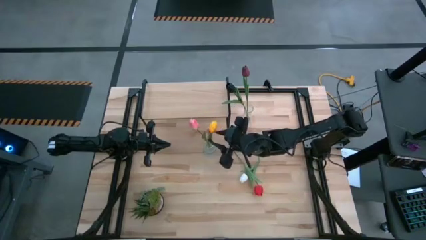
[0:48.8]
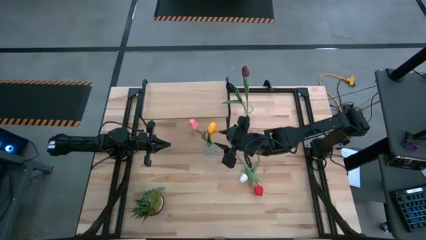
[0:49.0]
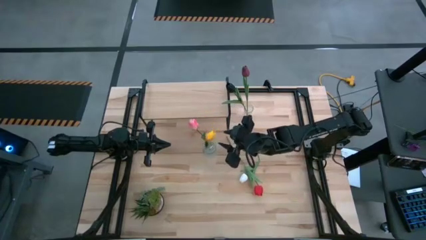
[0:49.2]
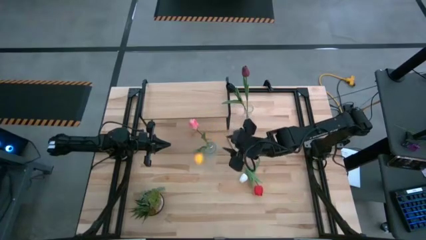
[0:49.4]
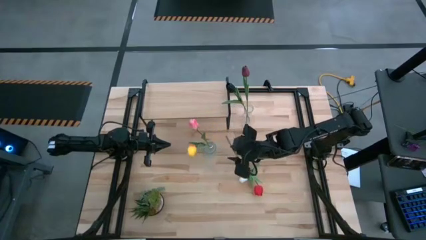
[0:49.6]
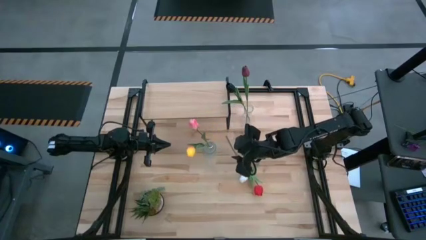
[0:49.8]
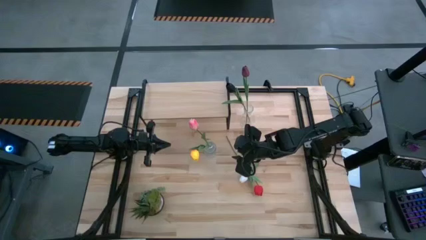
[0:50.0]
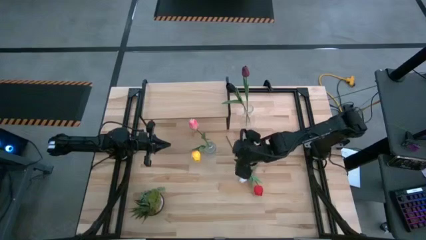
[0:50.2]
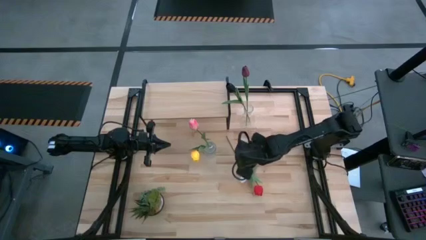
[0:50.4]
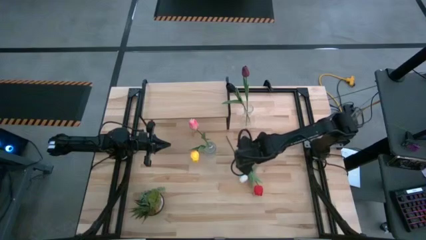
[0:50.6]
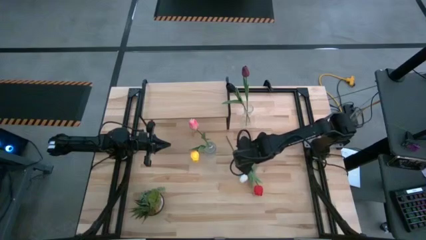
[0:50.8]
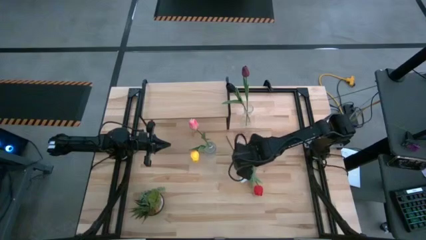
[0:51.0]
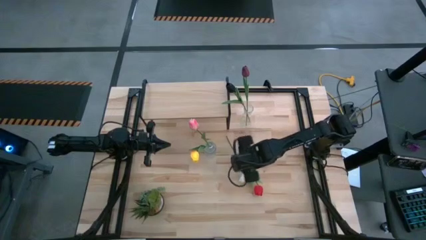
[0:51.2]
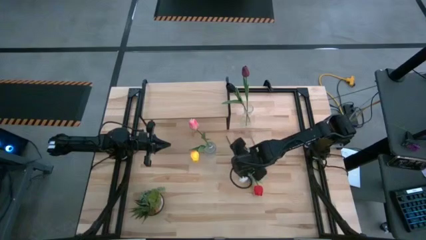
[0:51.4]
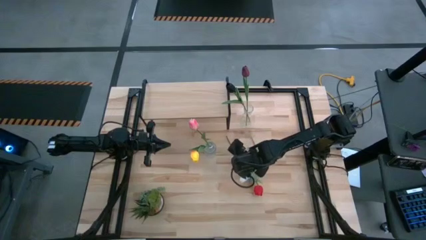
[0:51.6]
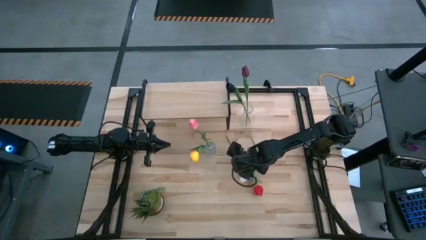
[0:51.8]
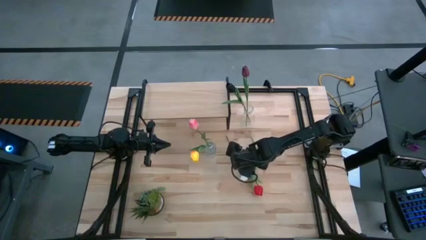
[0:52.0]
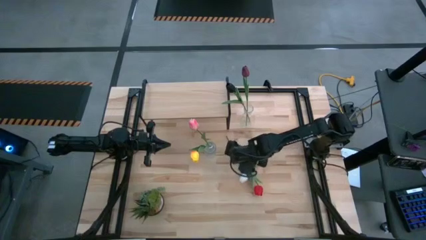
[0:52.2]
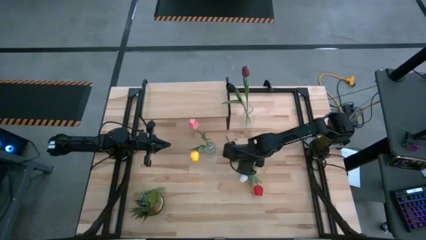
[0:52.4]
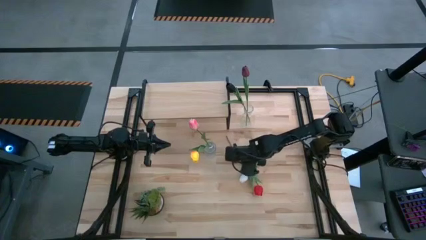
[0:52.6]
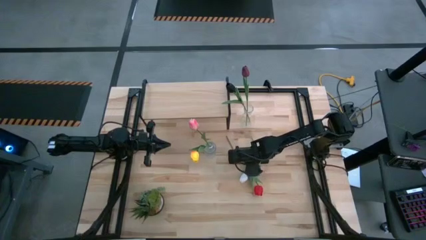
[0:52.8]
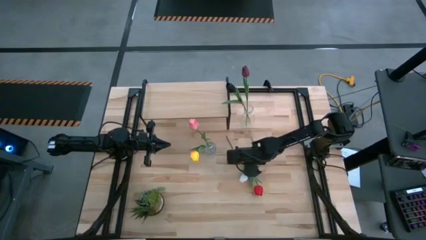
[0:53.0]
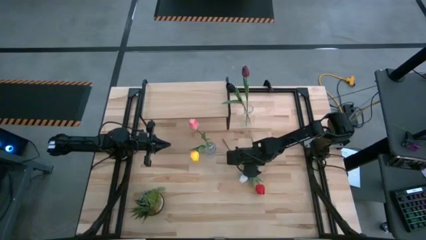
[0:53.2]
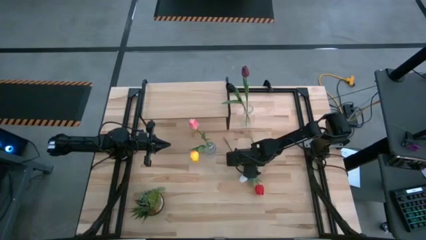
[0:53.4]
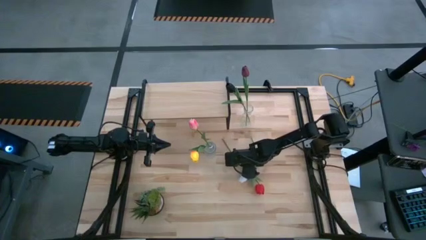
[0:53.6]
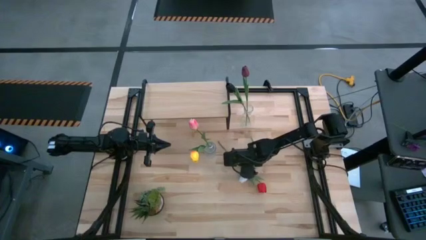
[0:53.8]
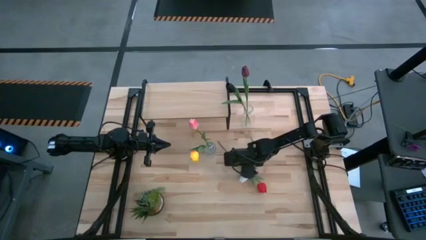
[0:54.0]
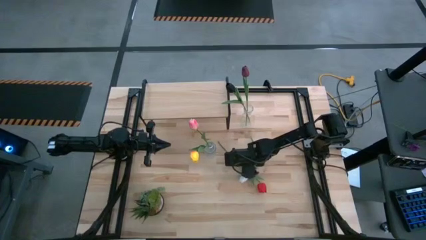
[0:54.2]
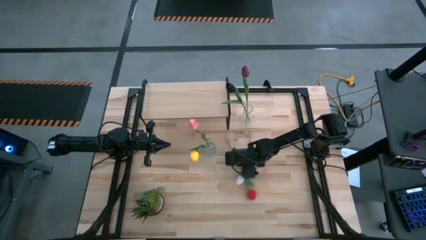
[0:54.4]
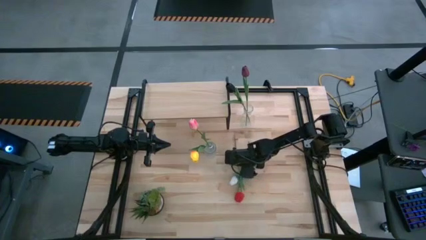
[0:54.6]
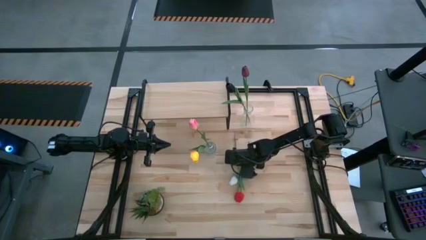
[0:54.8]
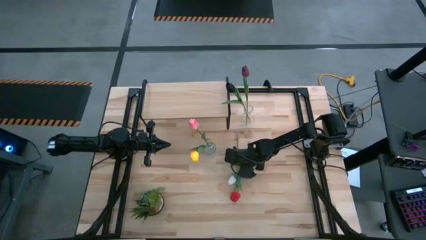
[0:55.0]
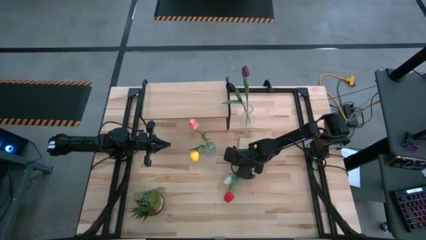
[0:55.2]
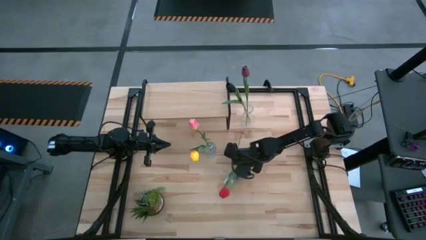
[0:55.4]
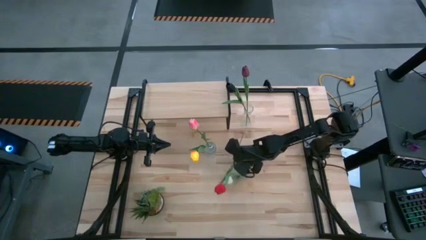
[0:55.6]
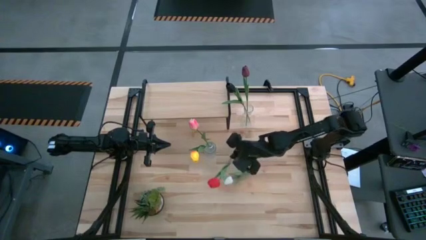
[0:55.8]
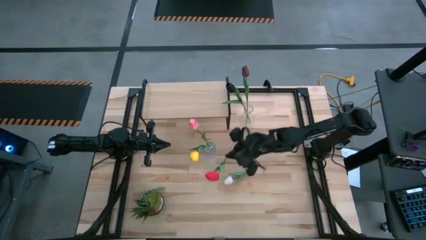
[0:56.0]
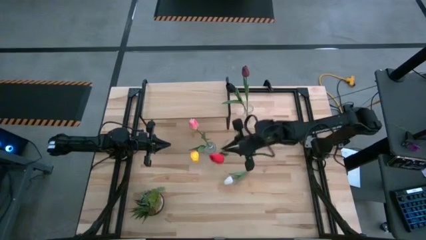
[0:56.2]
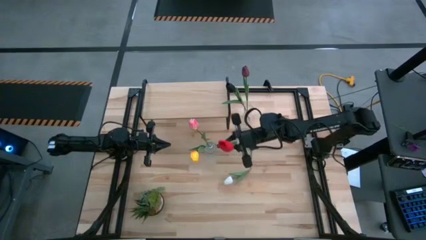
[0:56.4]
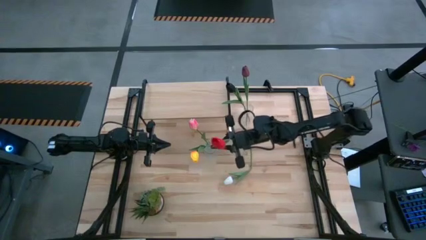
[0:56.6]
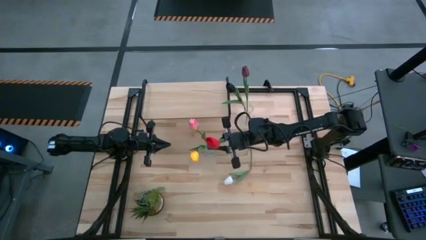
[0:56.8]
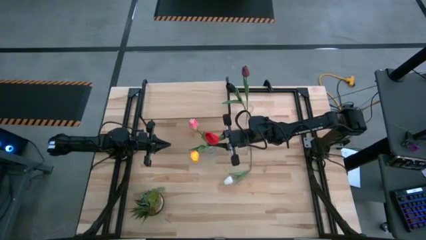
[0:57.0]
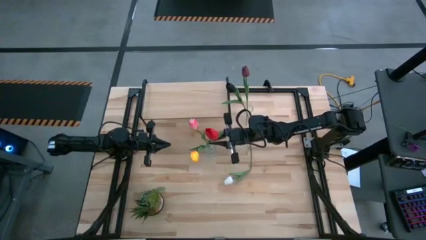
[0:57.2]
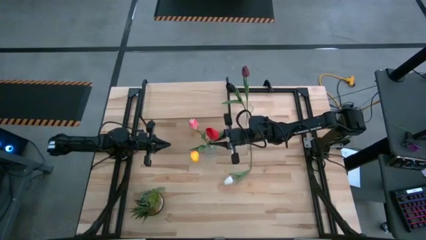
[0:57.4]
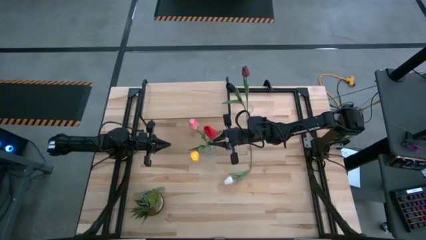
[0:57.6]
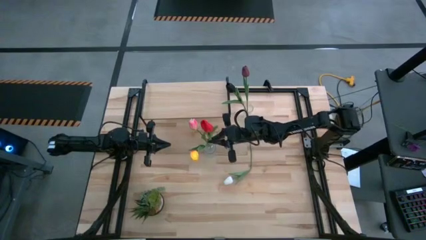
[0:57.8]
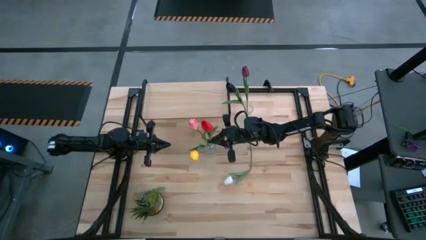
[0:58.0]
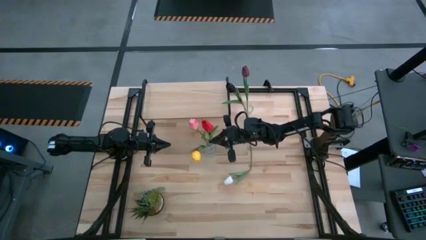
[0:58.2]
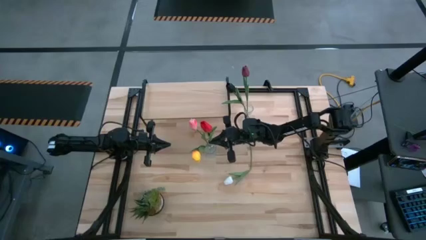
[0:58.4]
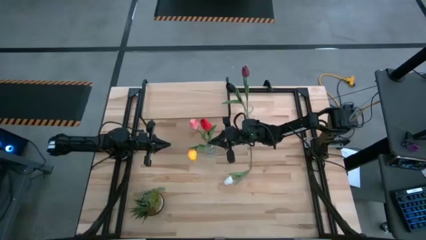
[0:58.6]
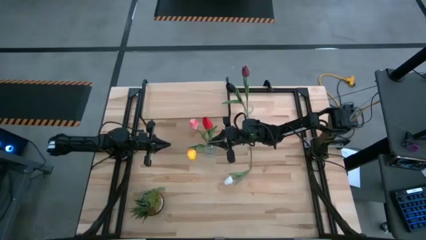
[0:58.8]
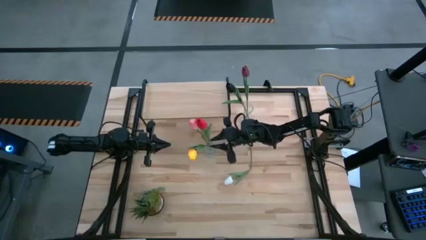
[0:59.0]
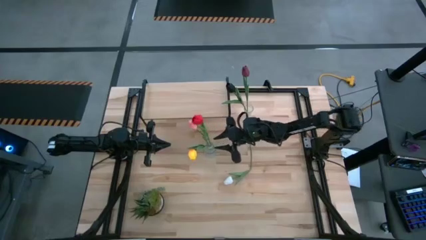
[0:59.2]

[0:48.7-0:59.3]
Task: Pick and place flowers into a vace then onto a shelf
Put the red tulip into the bottom transparent vase
